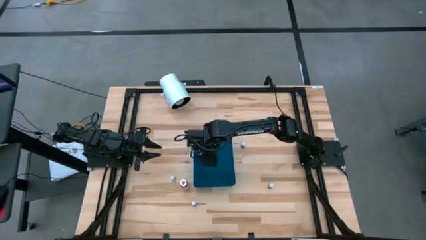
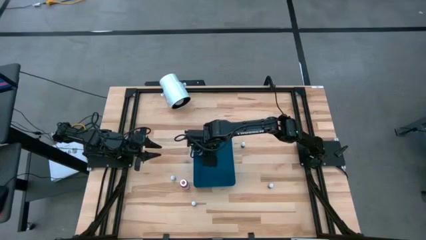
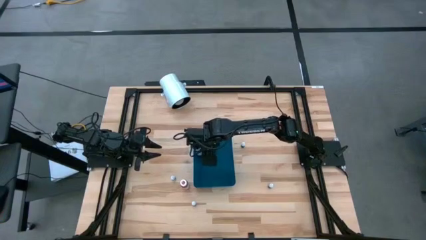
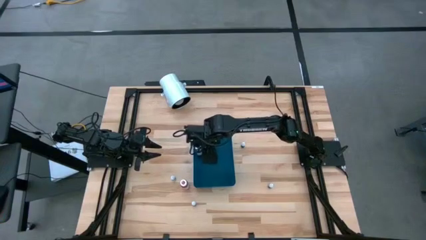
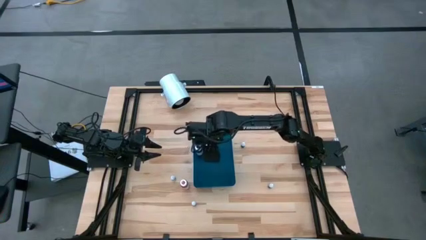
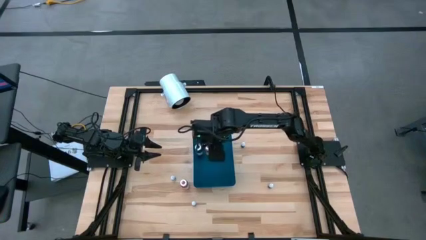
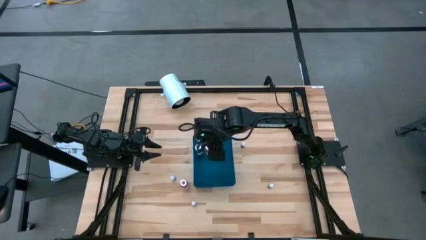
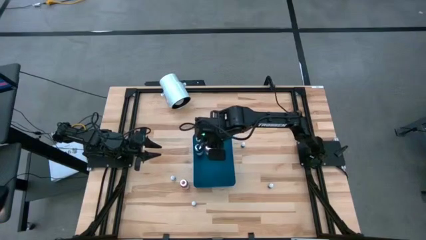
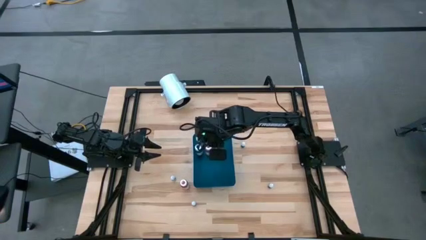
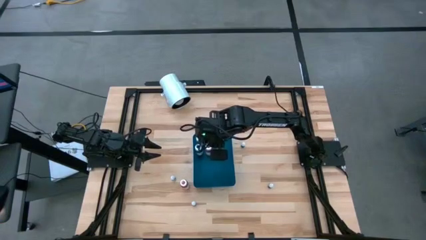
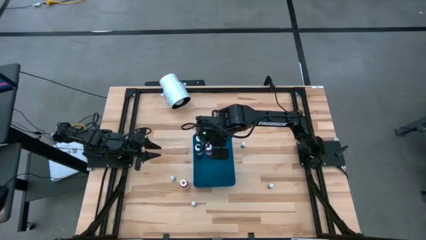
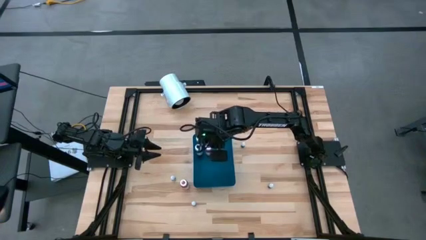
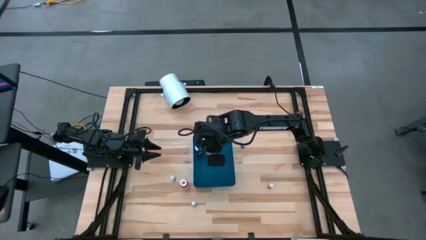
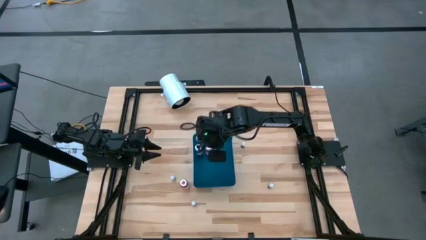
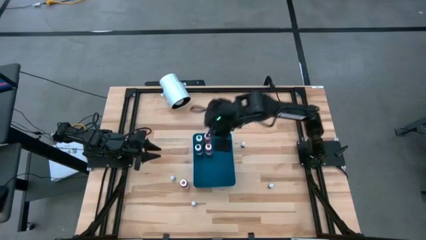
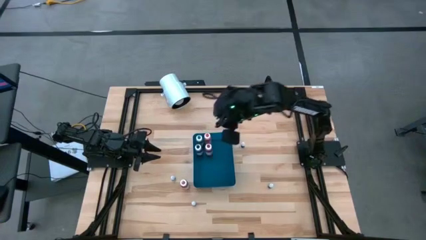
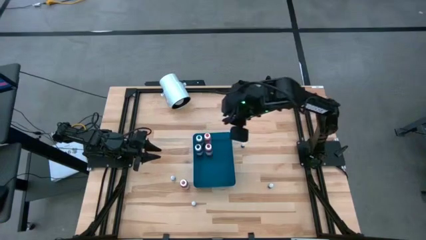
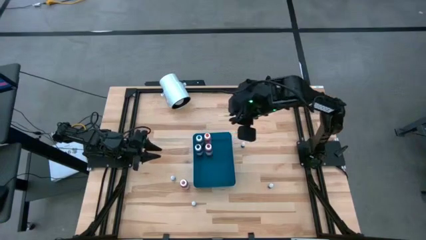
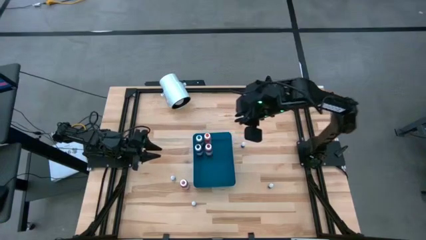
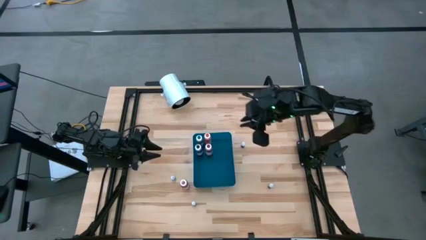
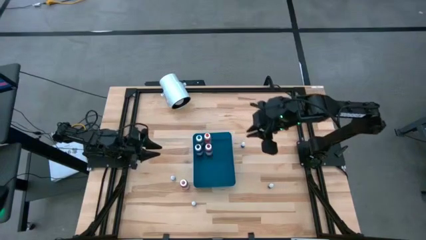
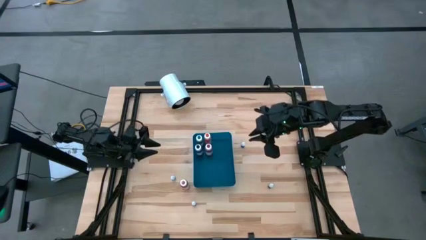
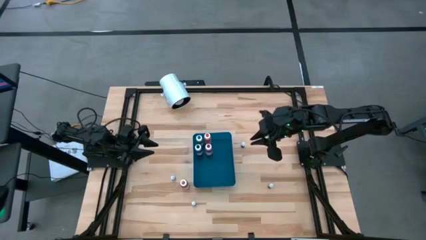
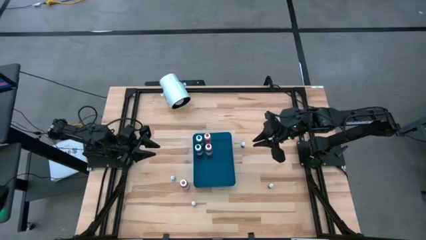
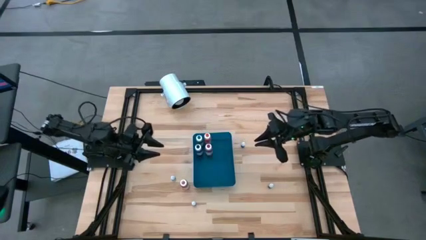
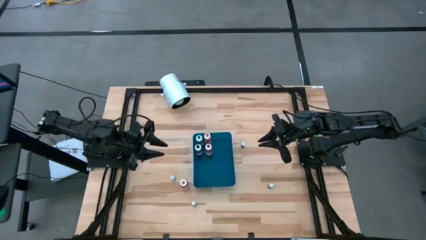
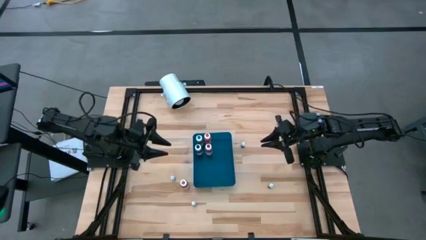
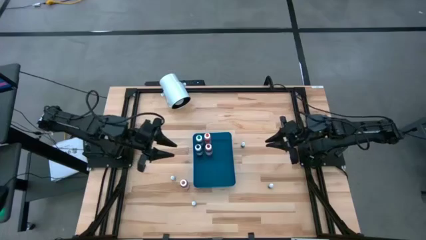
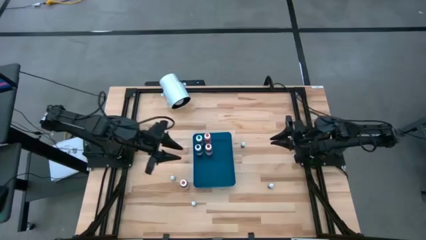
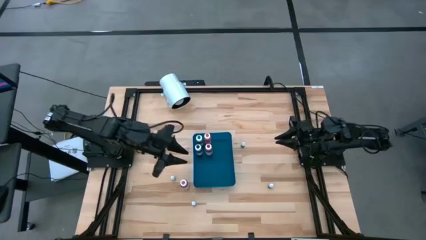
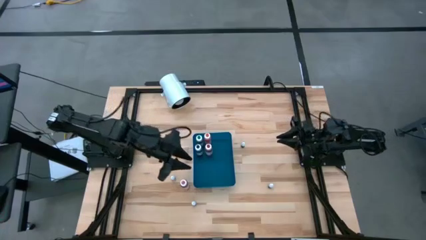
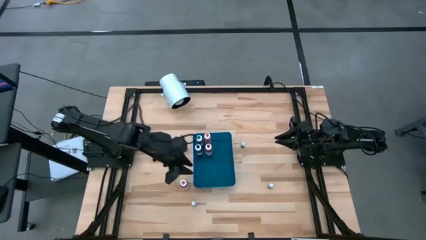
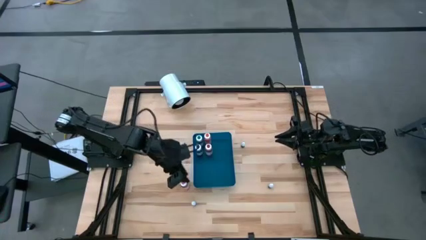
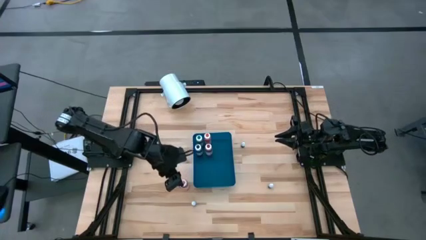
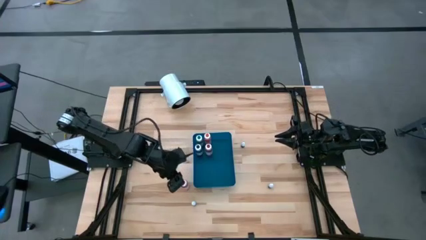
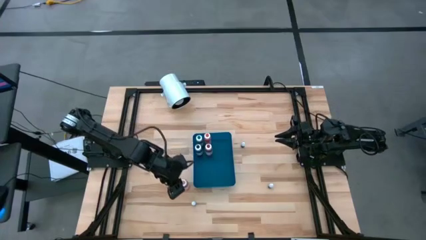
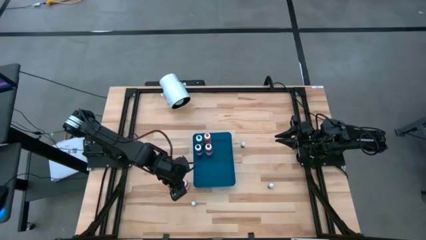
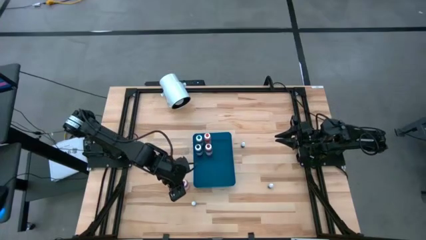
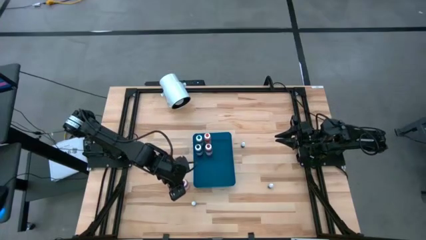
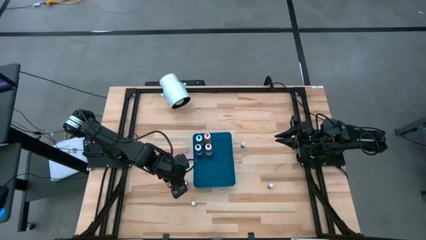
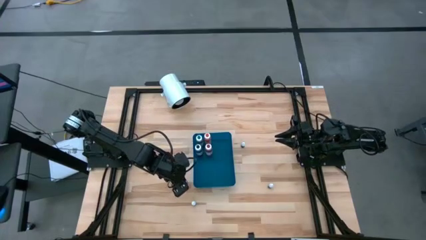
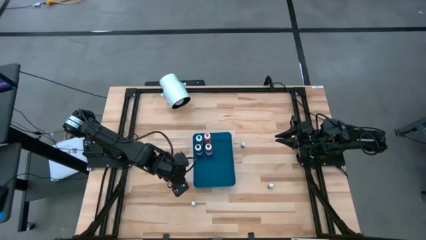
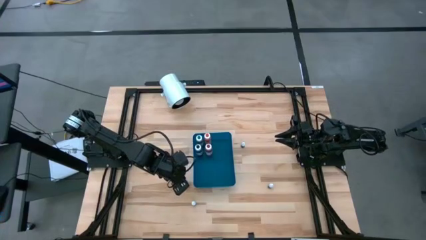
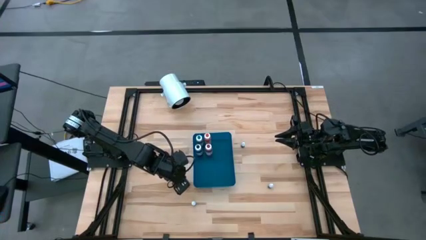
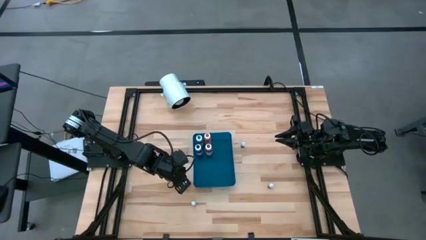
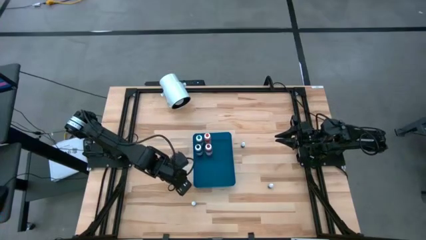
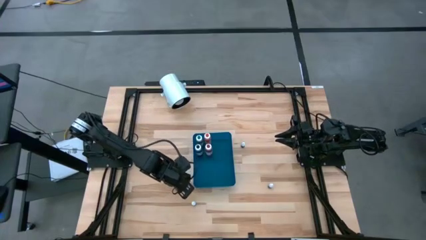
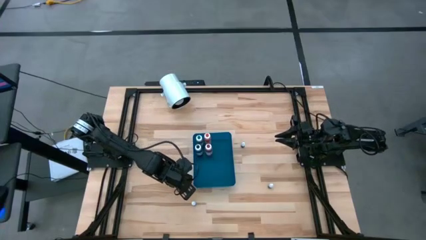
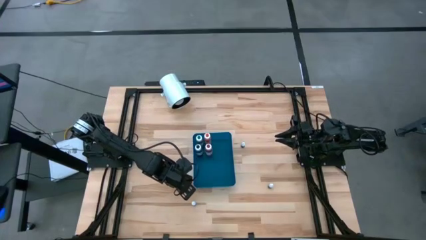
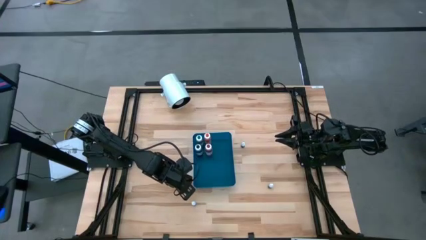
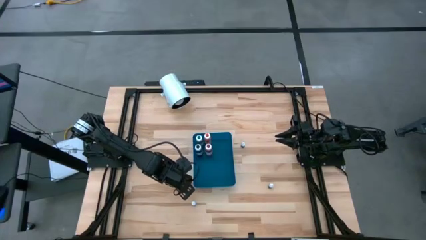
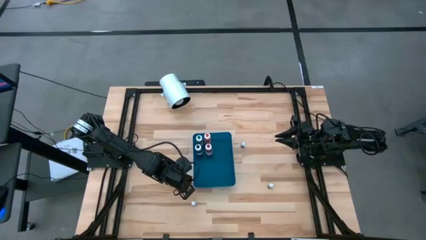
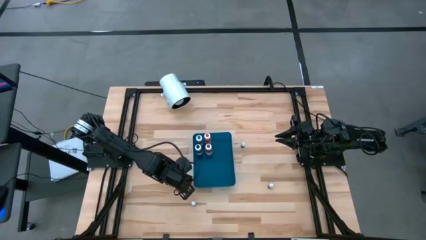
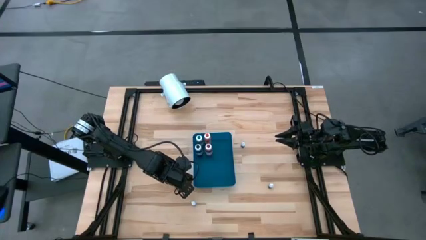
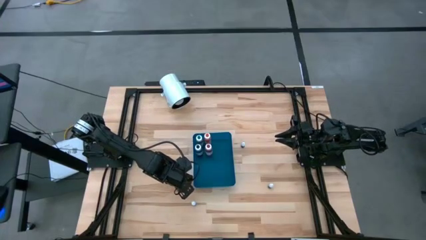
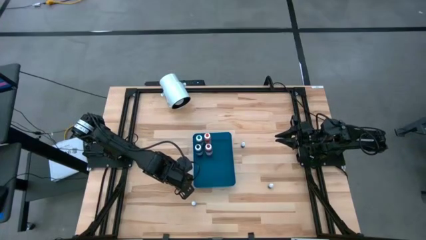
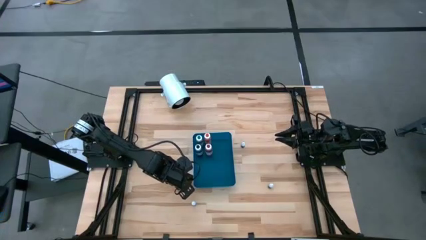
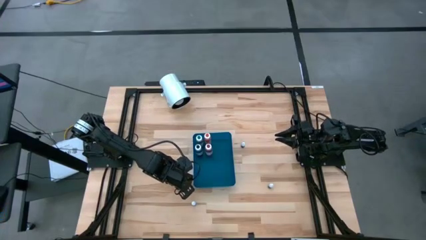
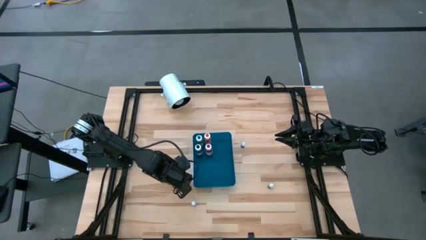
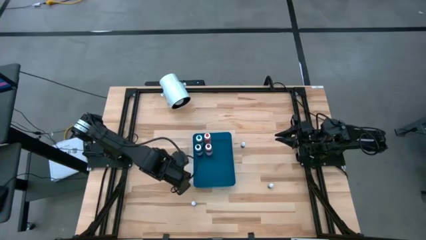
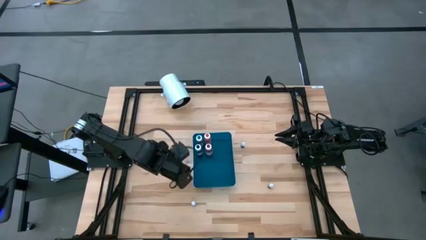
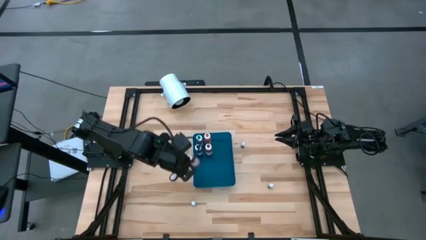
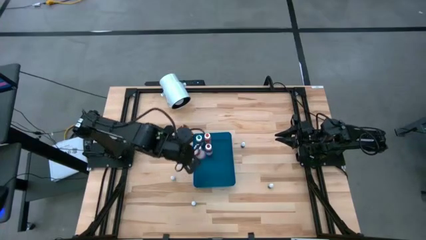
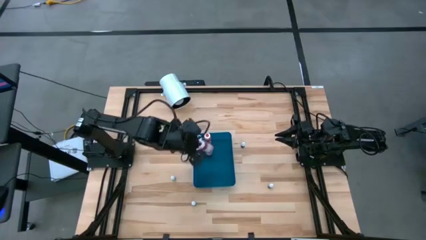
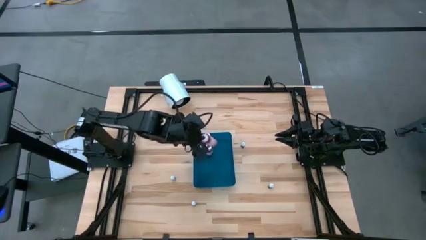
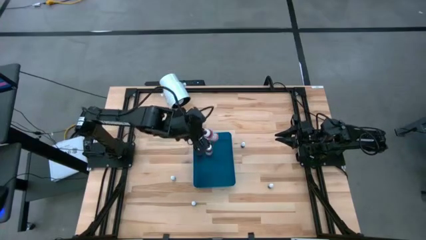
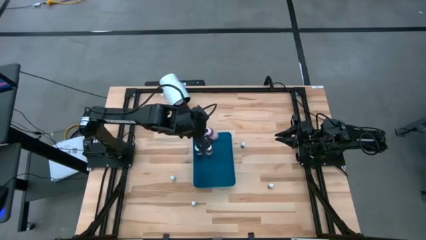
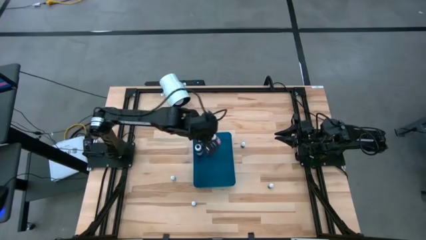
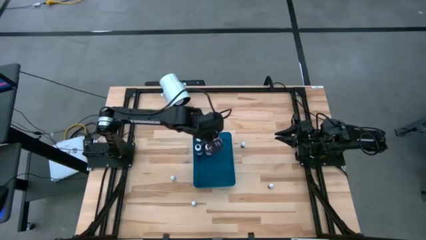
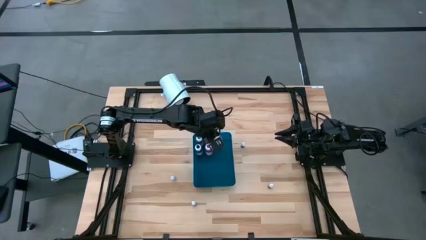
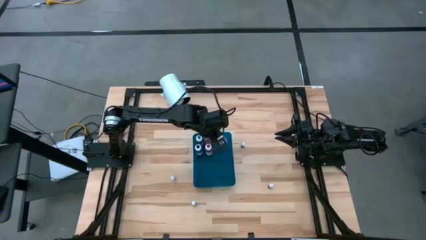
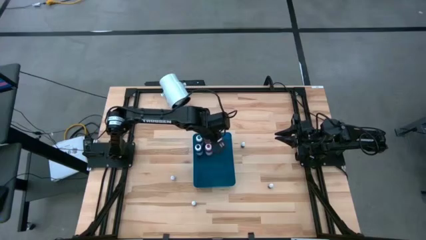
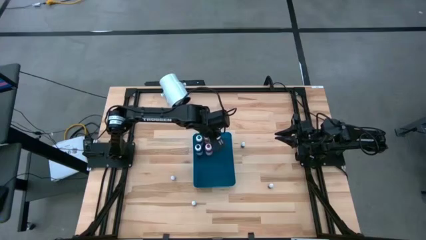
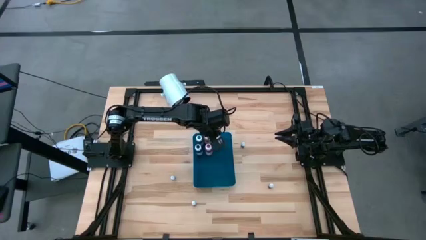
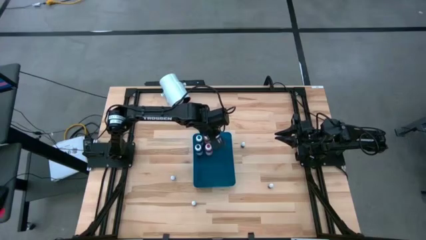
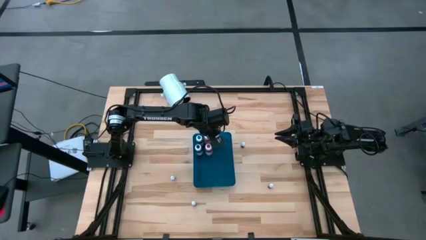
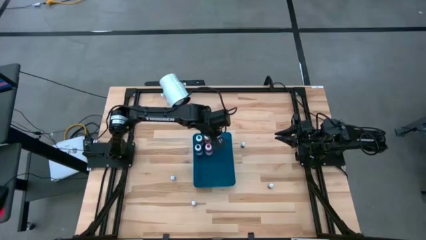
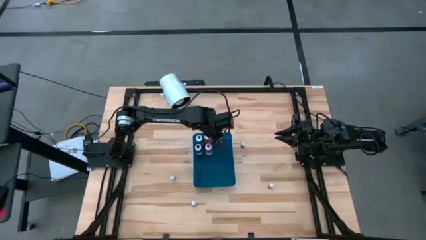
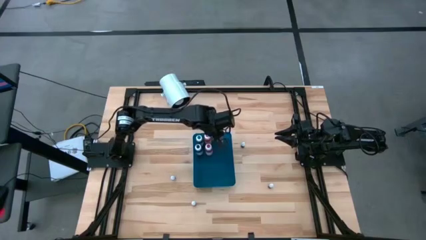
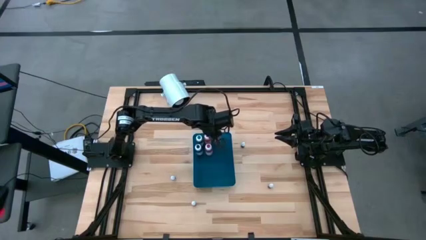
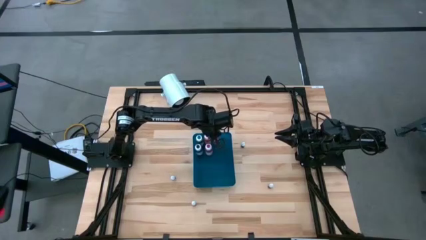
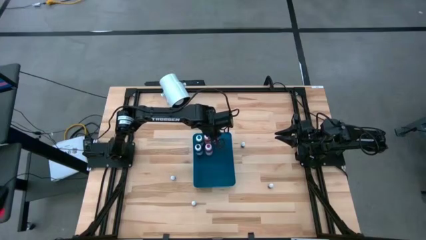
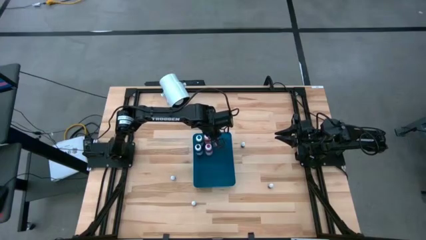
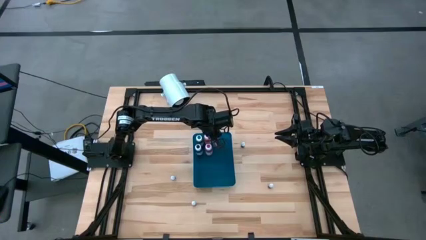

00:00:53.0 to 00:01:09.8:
Task: Pick & Place food coloring
Put the large pink food coloring bottle into the blue bin
